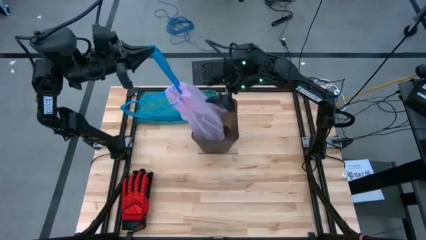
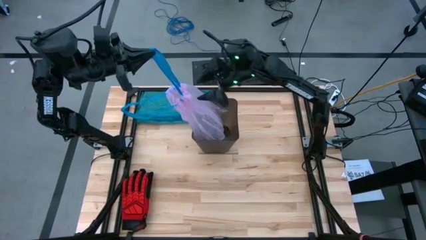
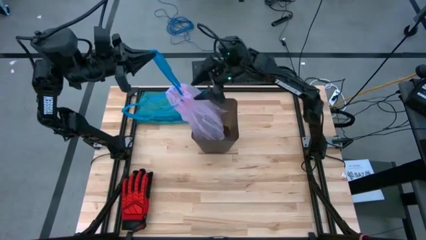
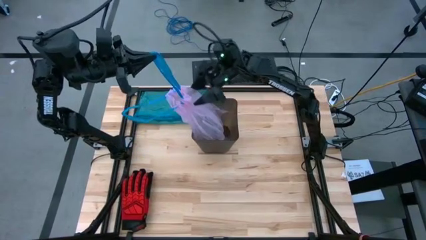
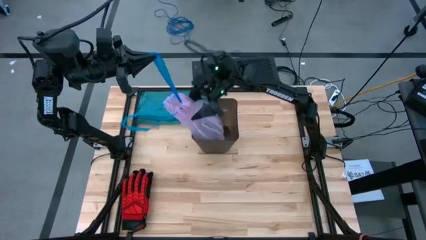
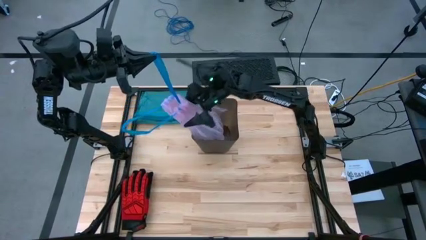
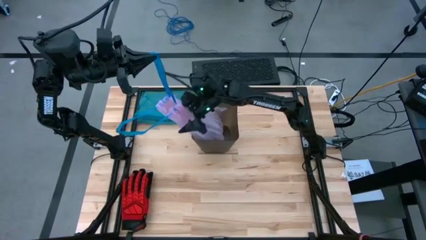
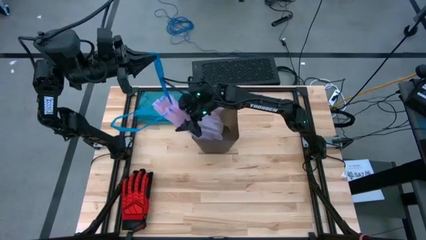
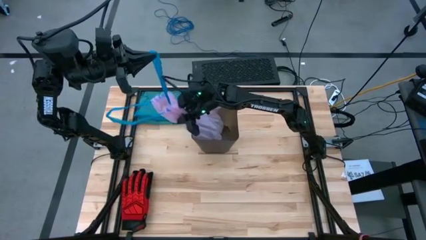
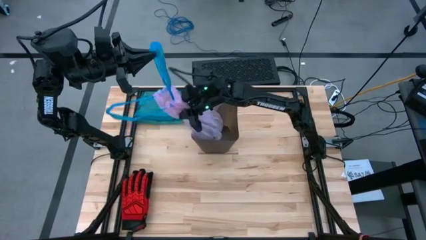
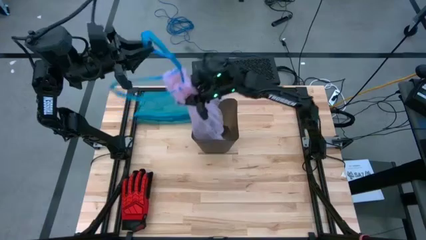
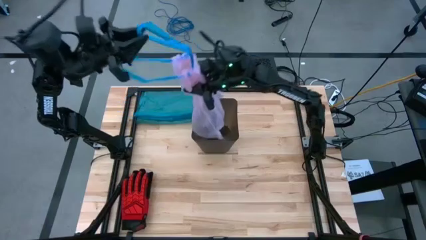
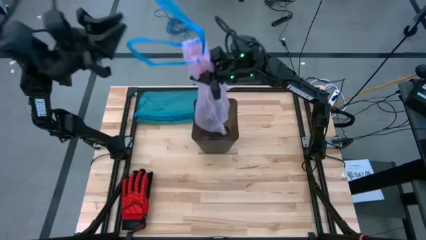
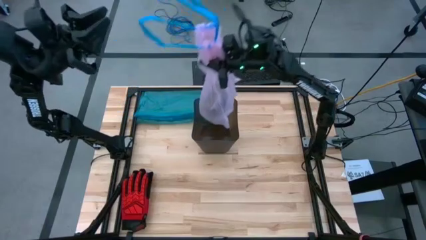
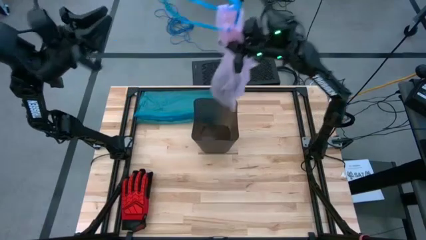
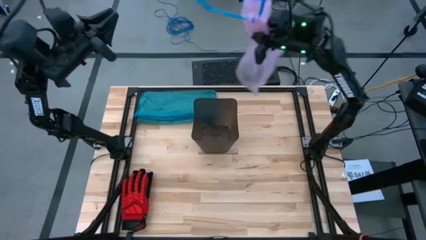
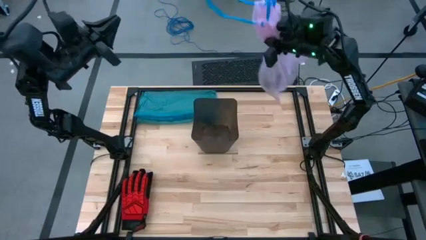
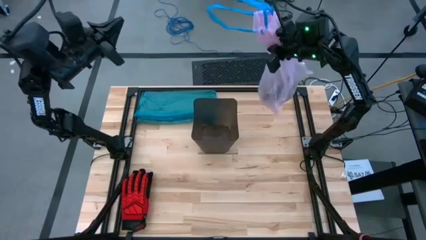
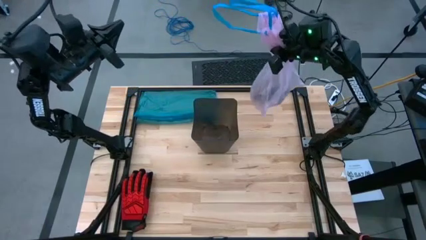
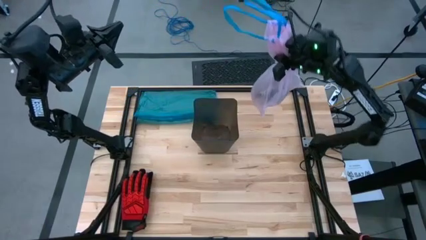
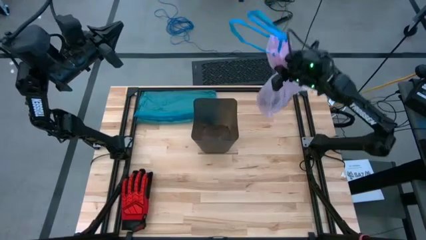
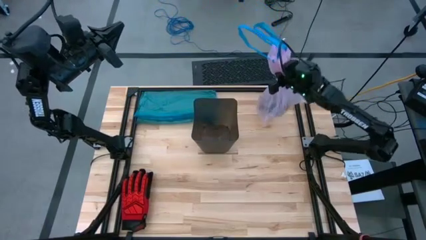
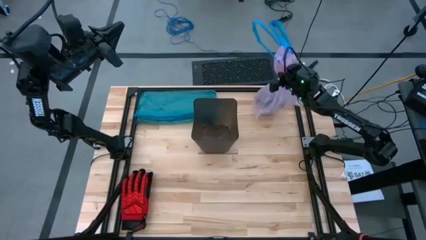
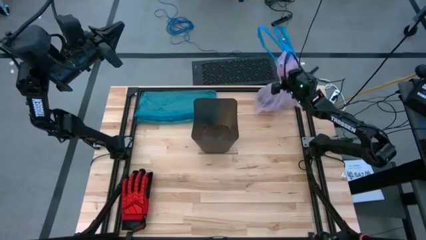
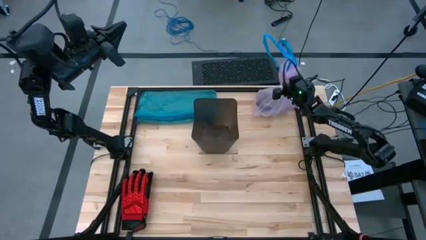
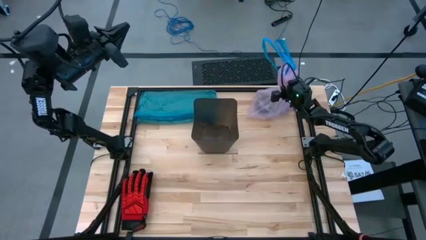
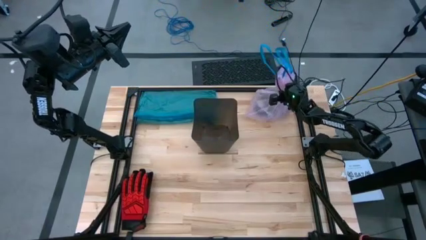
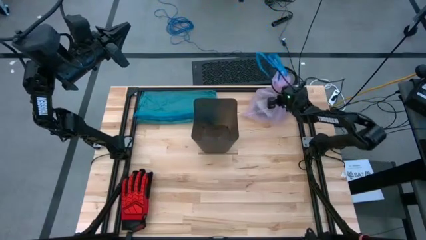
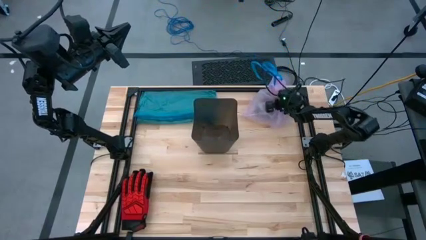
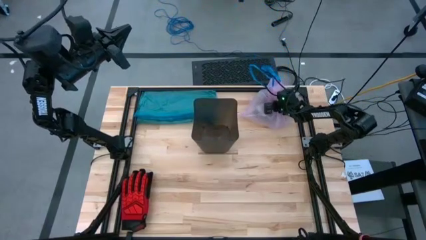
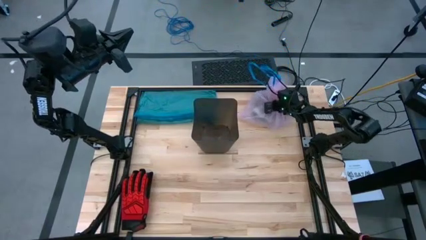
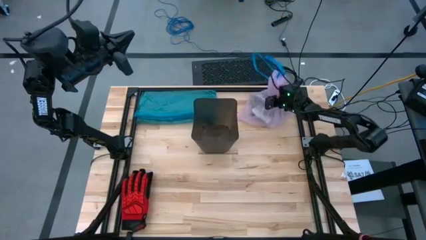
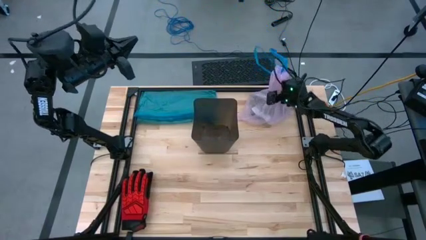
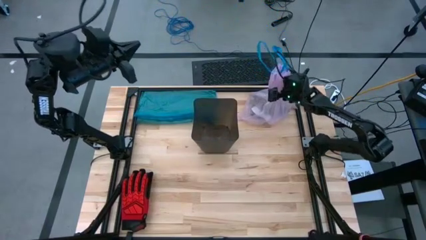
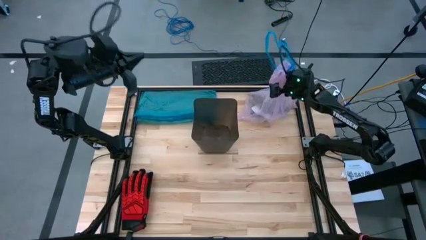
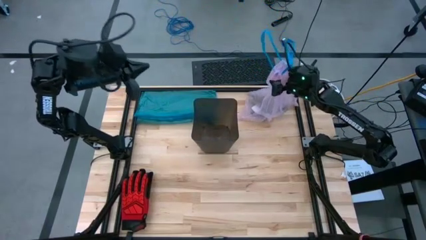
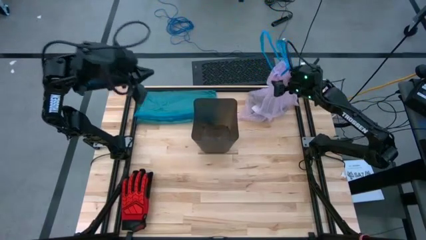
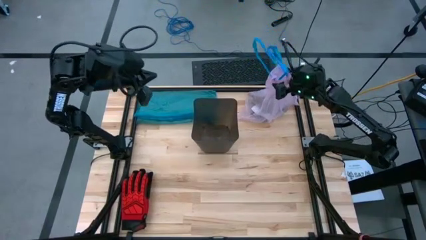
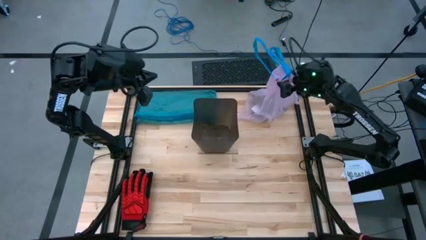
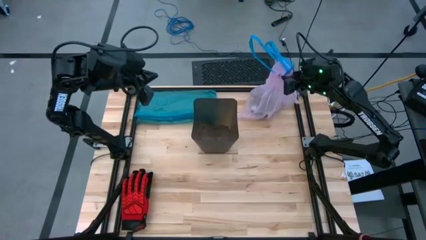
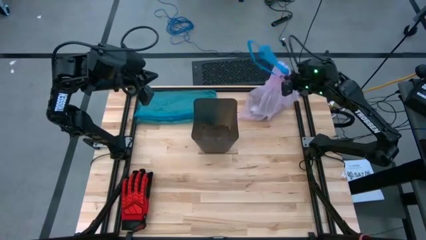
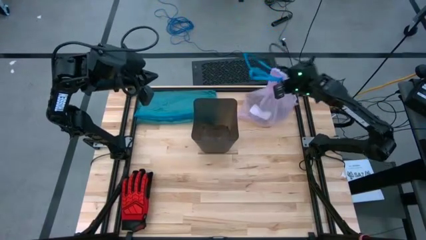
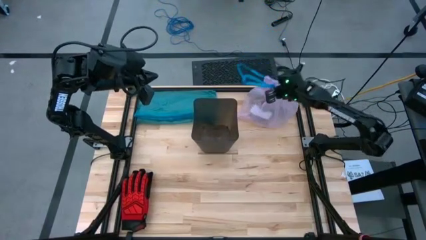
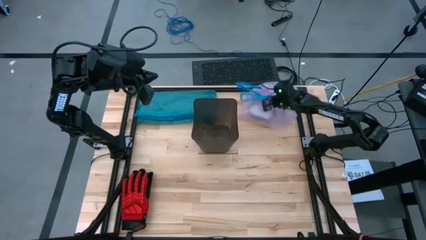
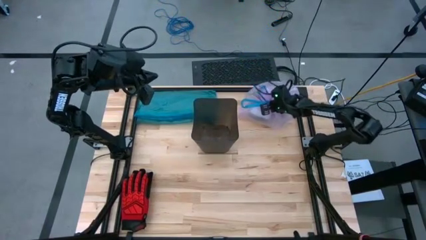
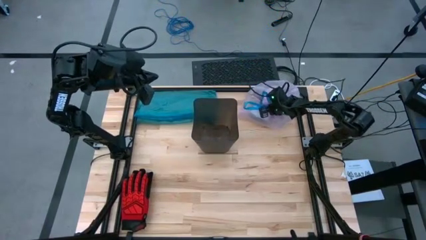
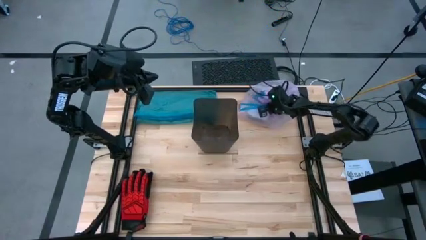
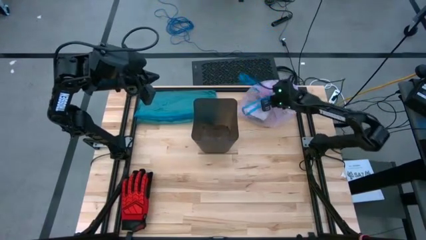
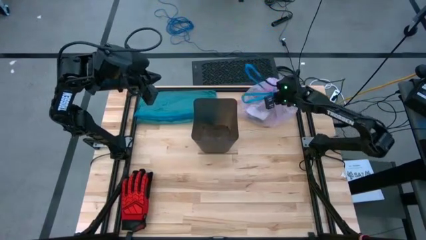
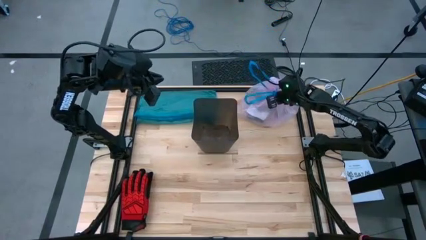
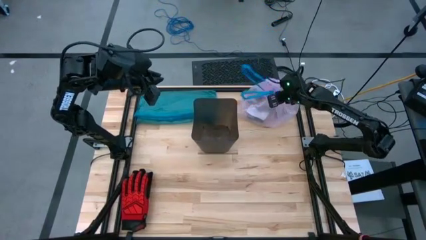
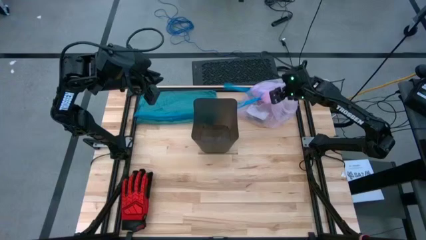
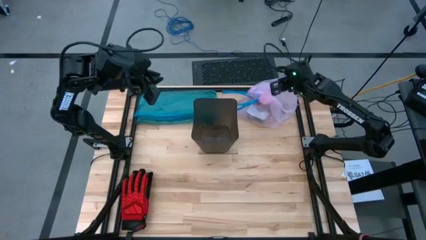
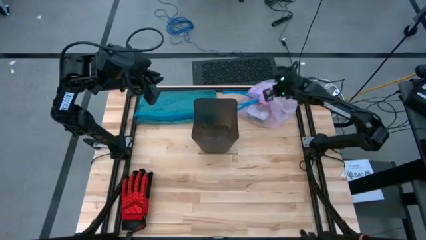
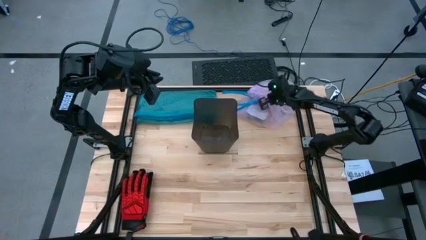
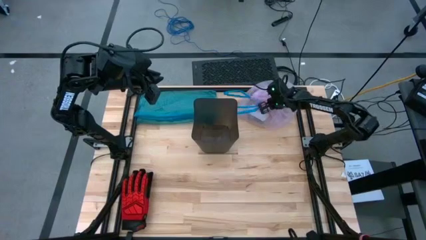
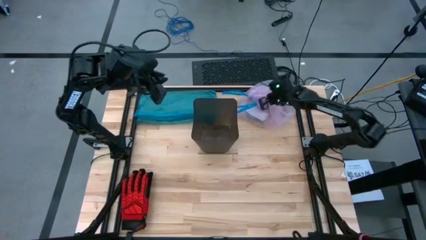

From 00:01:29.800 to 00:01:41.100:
Task: place trash/remove bag and relplace
Remove the pink trash bag from the trash bin
